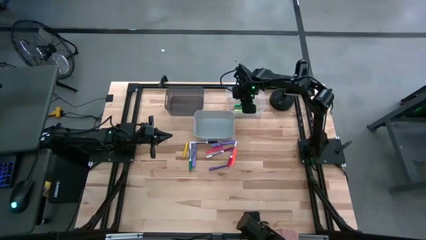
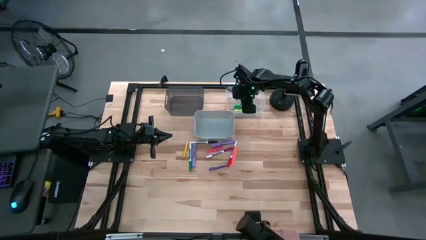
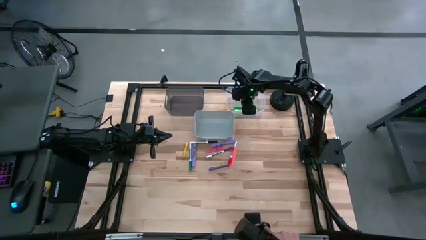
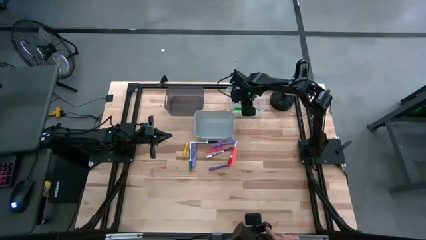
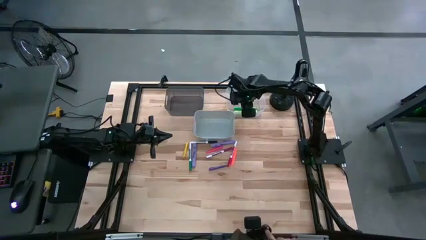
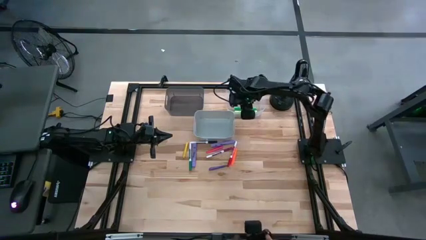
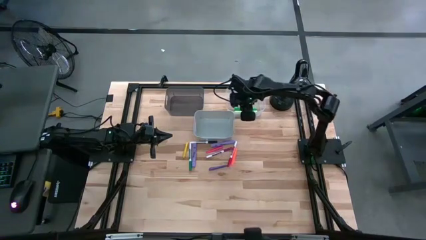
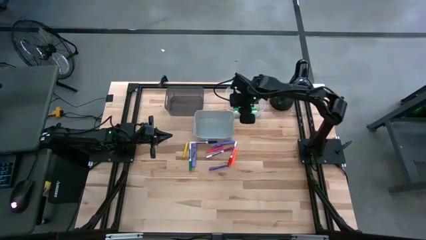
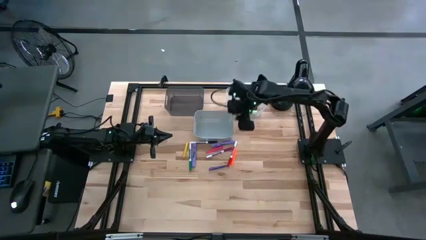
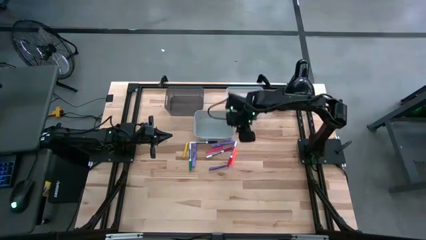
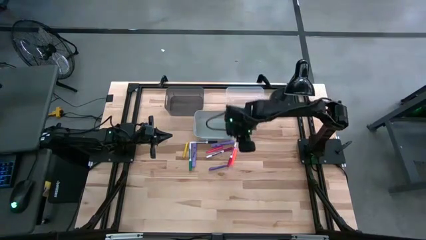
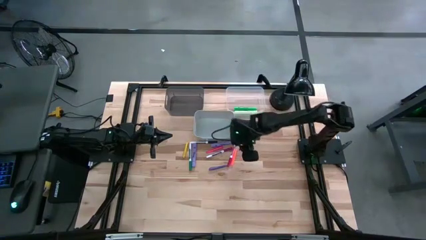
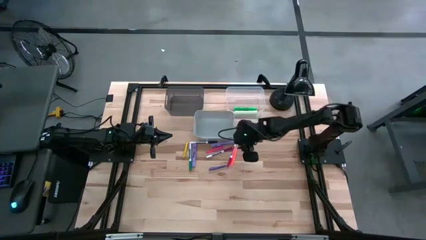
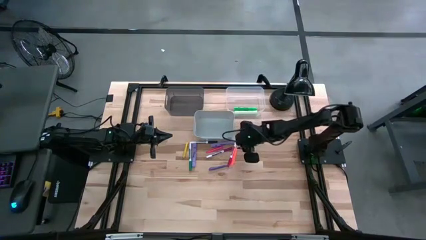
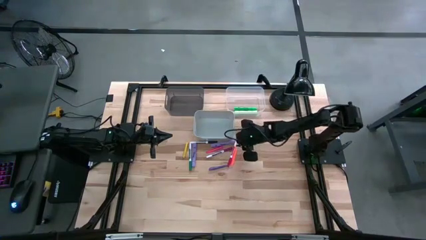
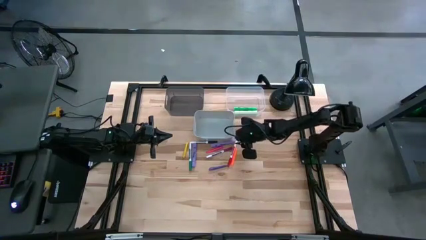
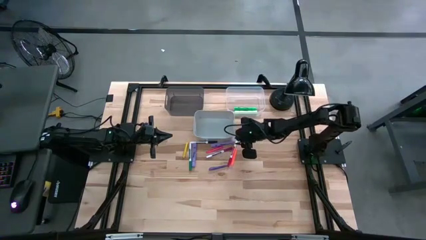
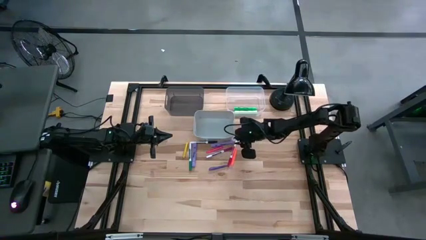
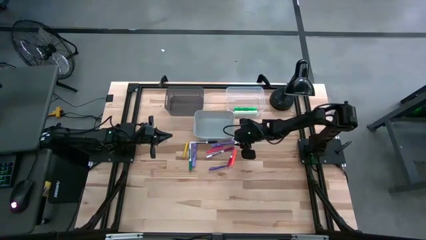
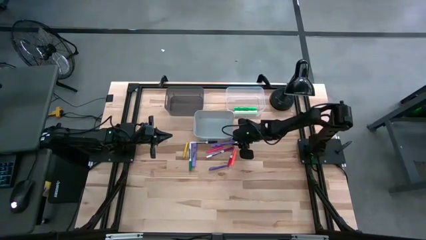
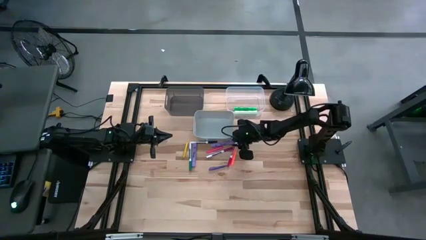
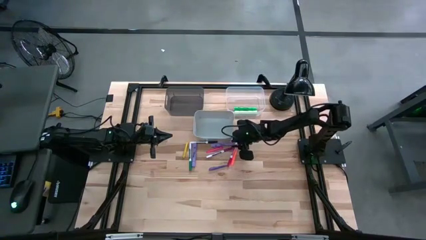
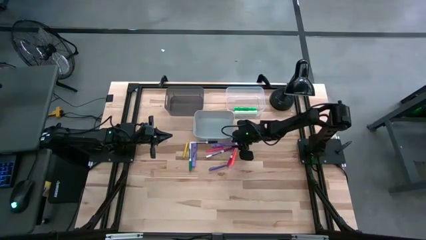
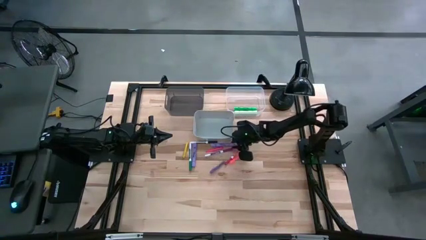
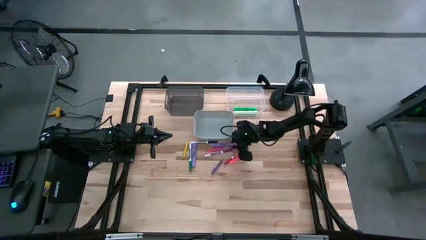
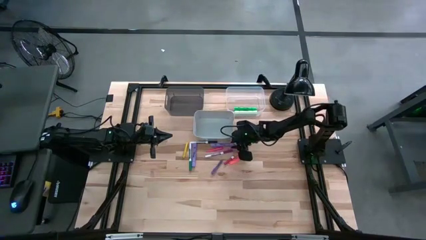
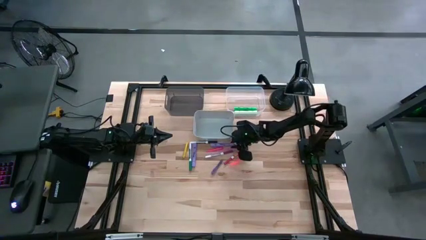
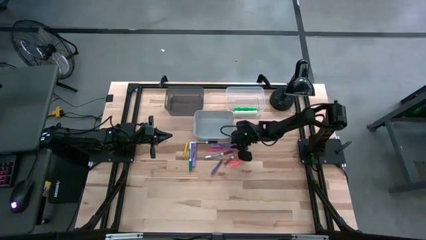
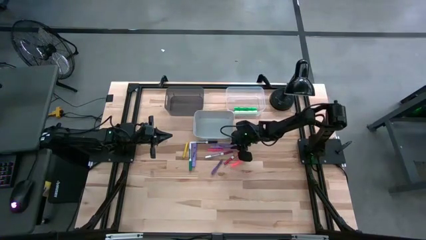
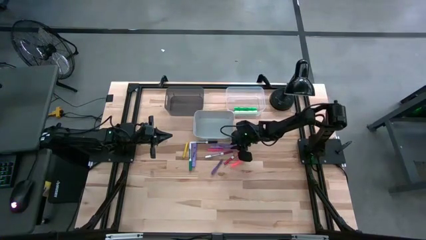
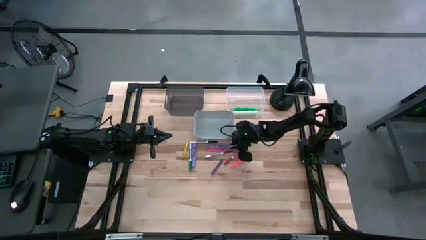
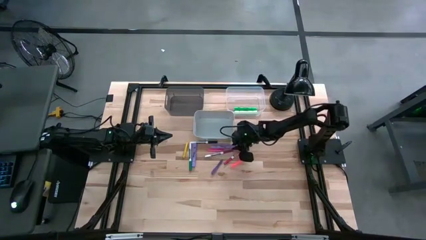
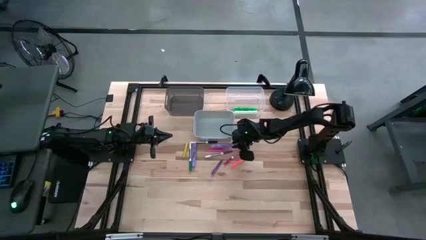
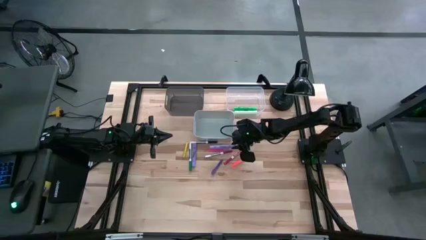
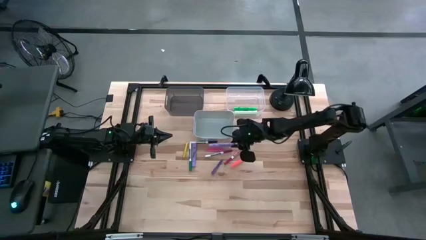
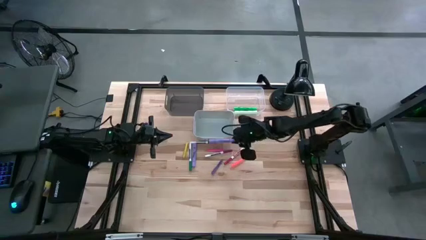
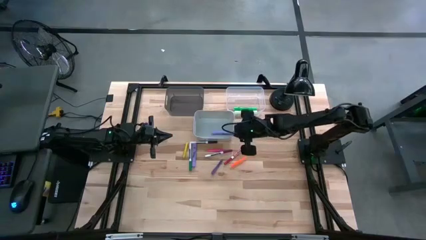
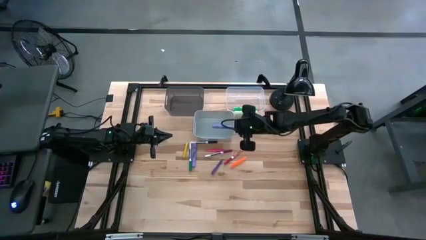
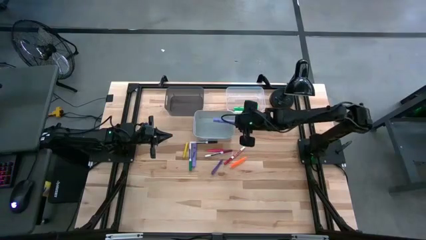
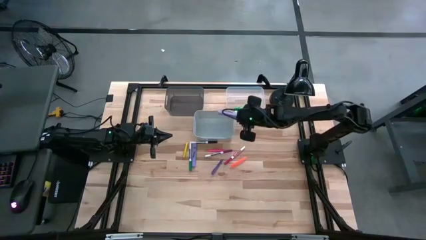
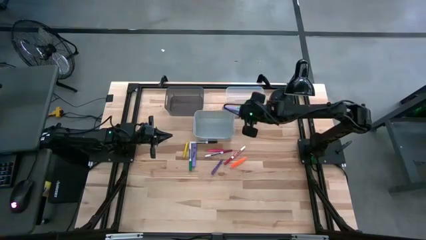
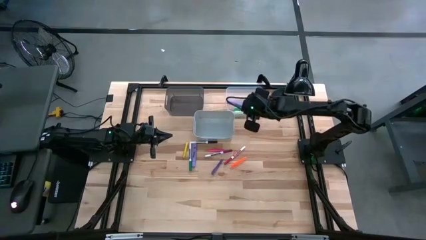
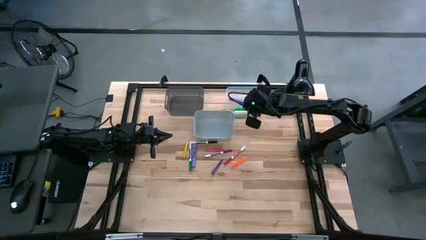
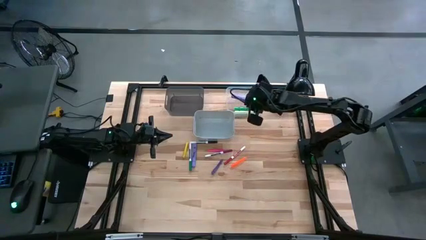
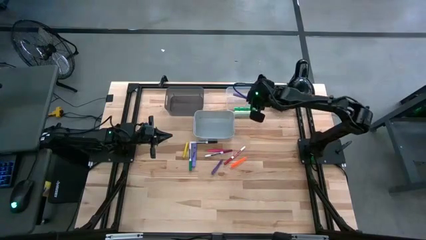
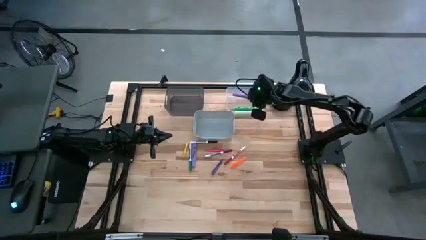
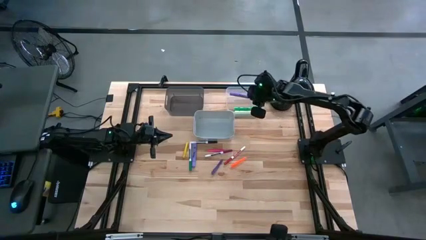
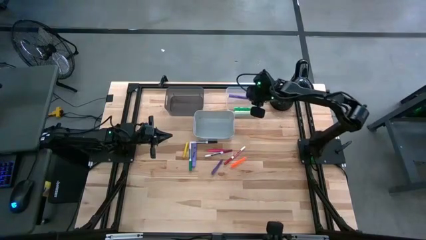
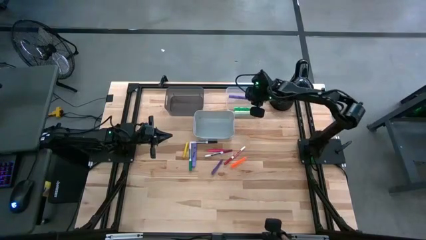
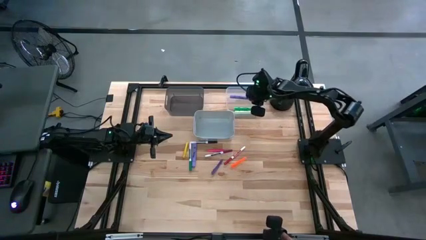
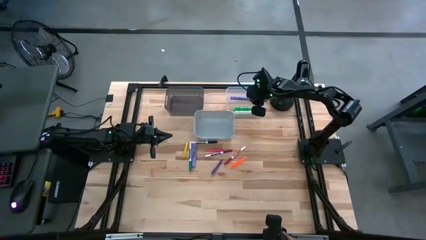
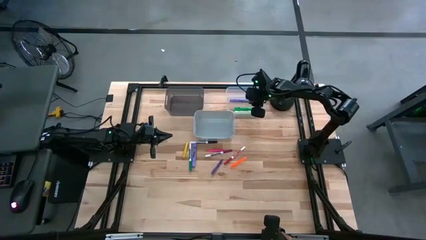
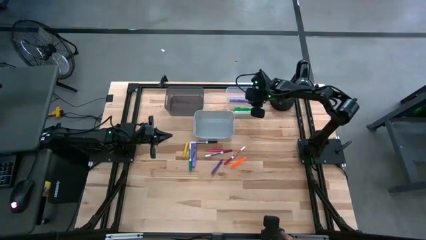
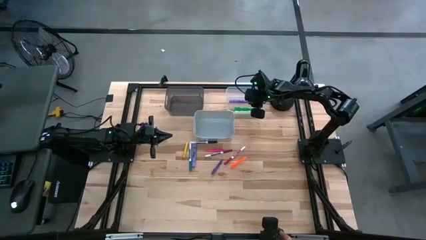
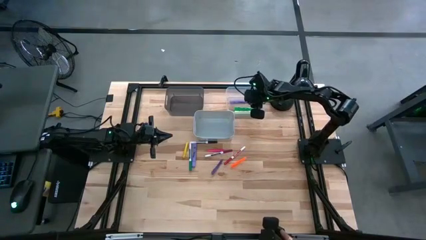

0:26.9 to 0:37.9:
Task: Pick & Place Markers
Put the right purple highlighter into the transparent bin

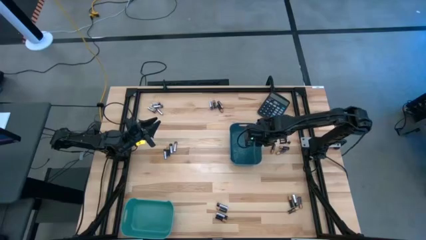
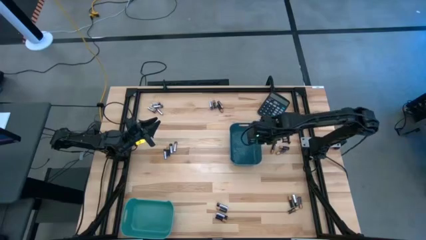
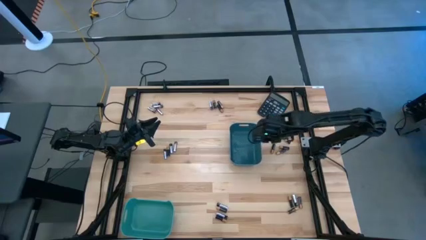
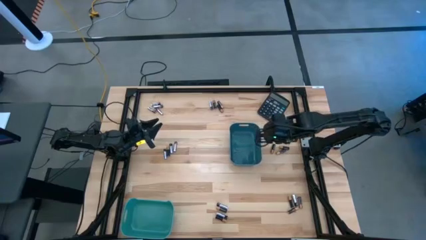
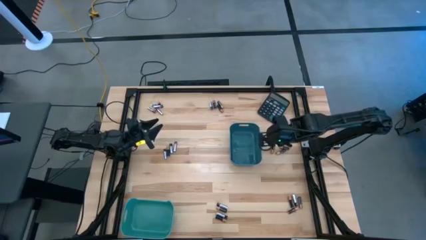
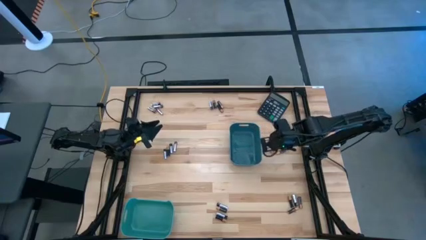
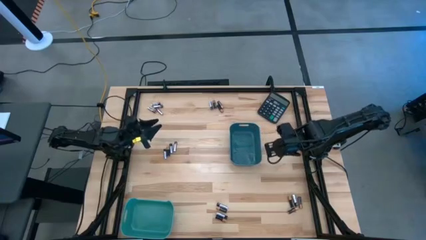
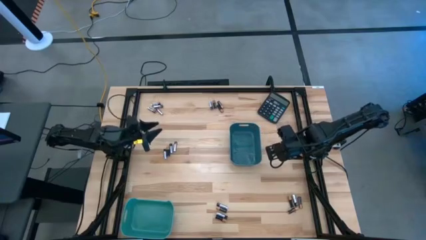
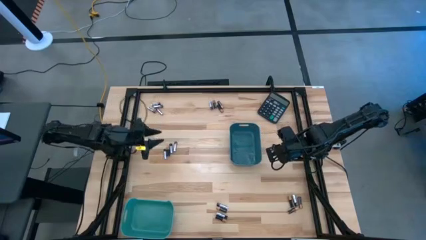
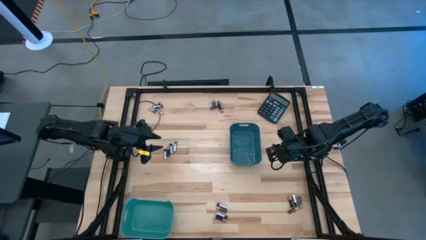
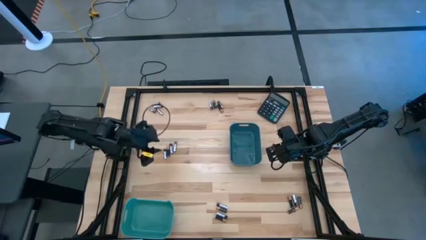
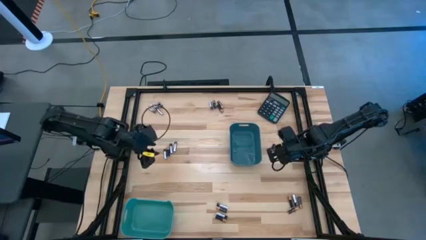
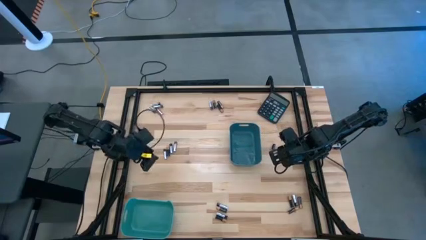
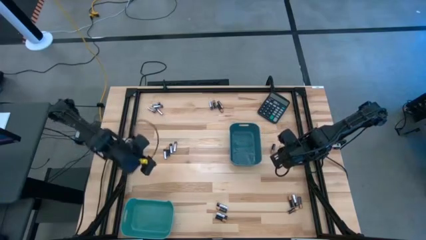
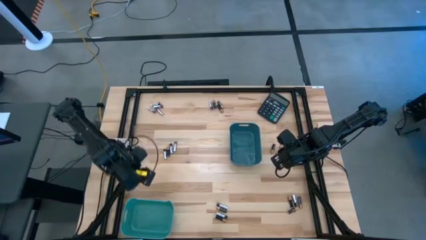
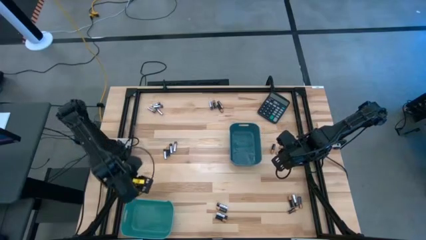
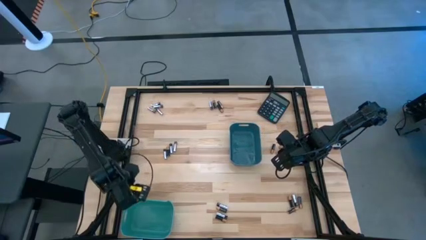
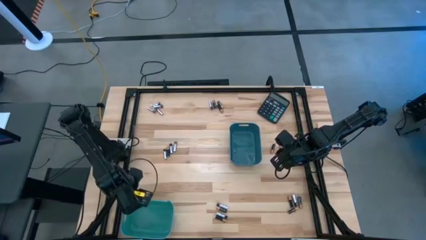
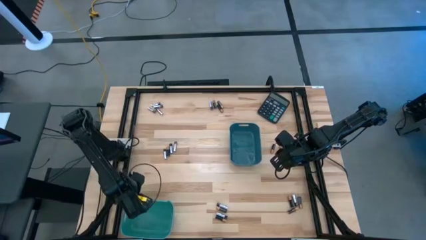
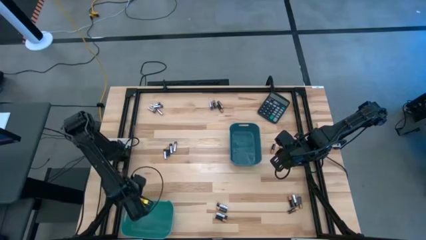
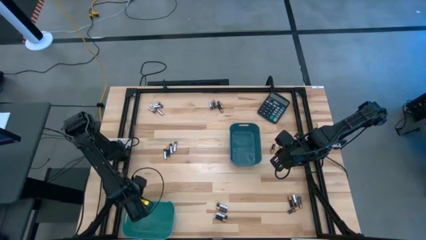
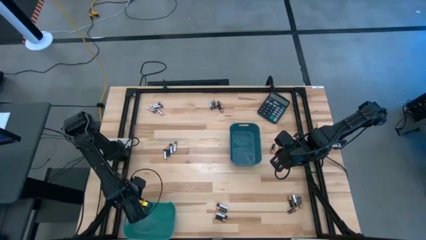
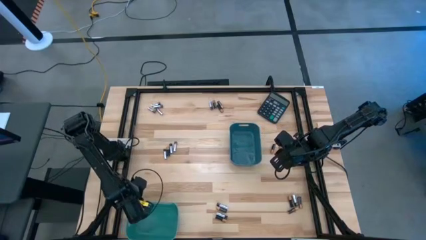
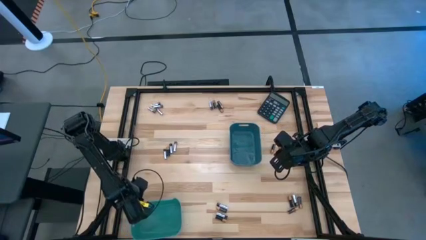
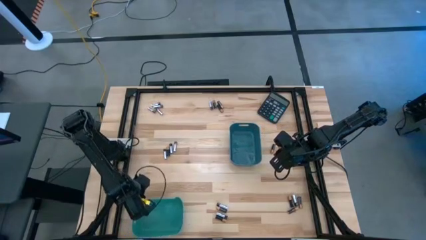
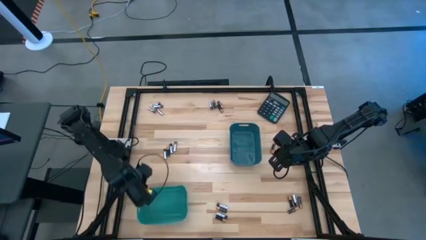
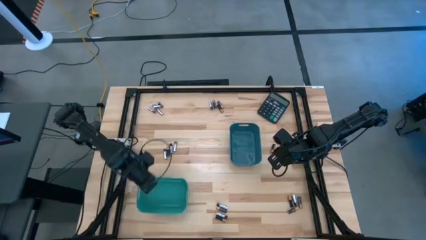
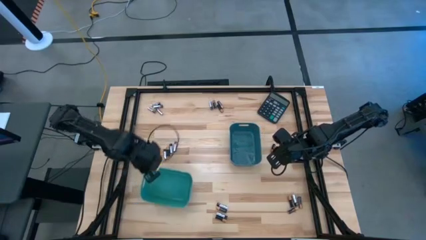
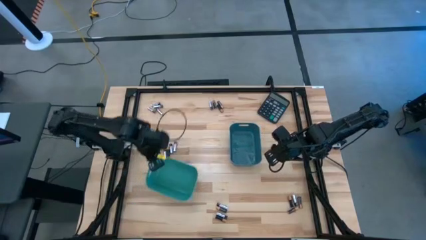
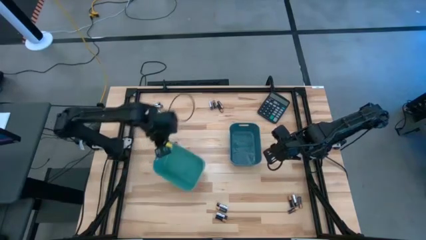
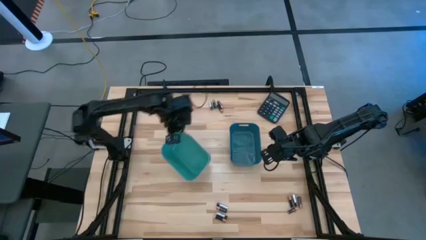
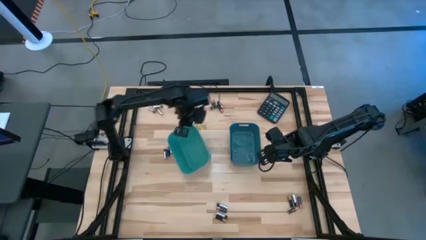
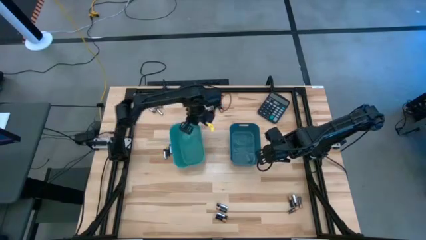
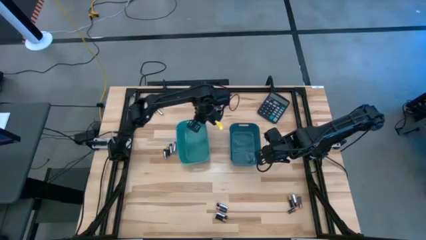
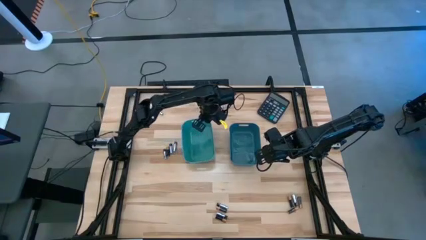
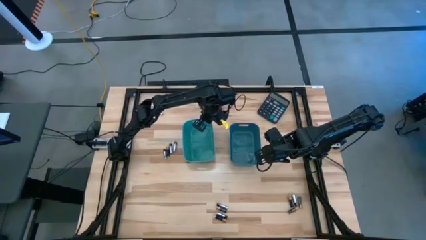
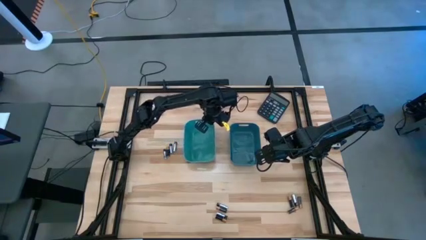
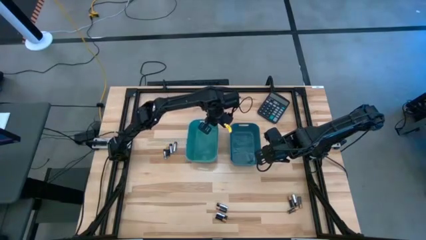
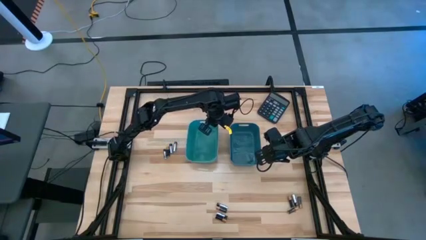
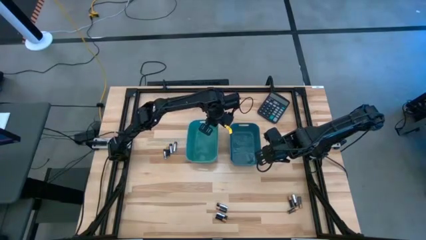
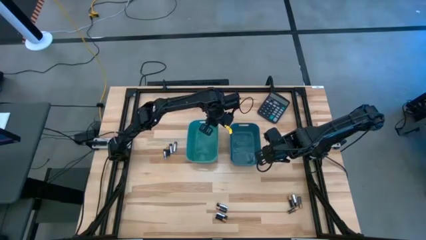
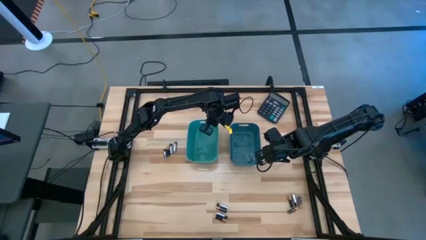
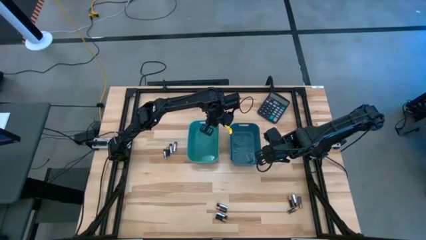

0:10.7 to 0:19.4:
Task: Sort batteries
Move the green bin to the middle of the table
